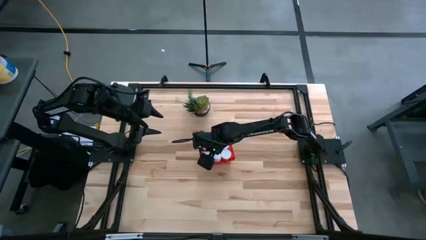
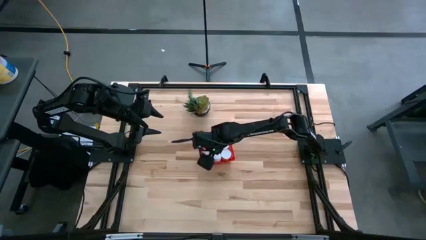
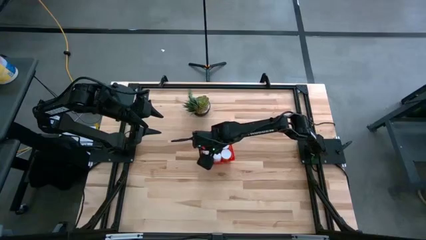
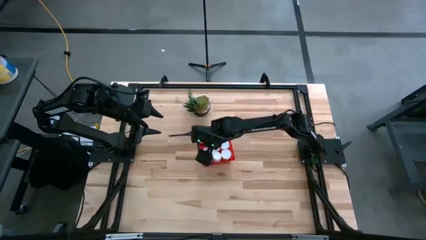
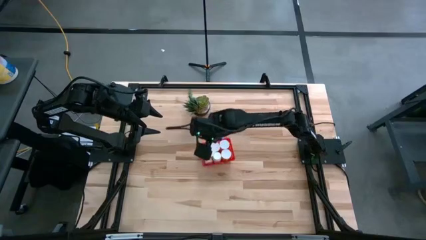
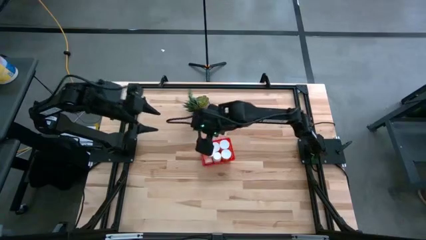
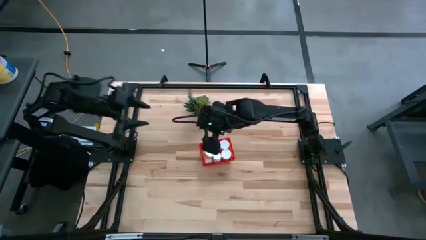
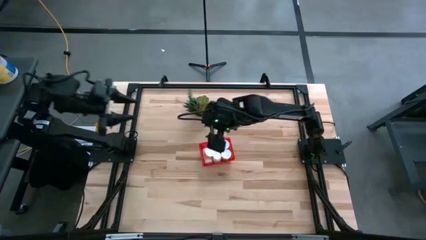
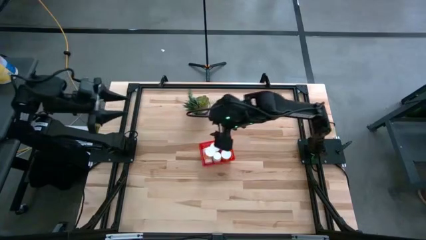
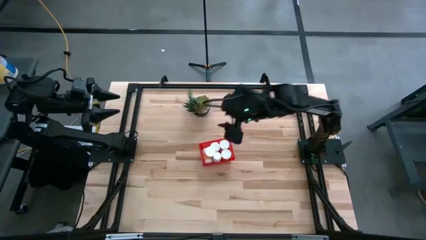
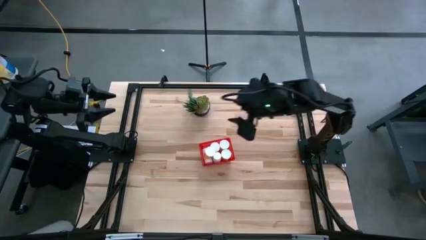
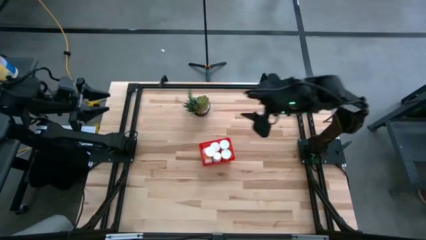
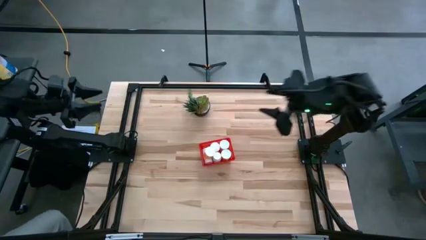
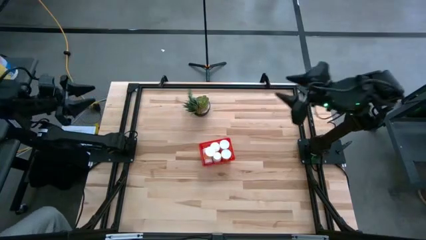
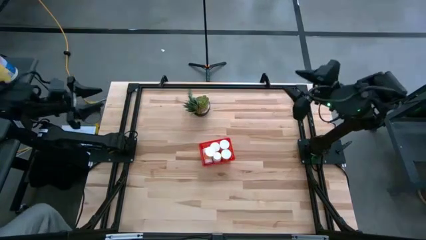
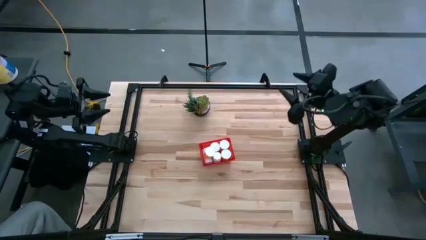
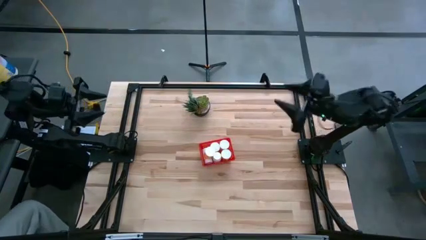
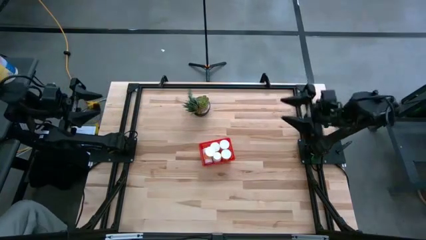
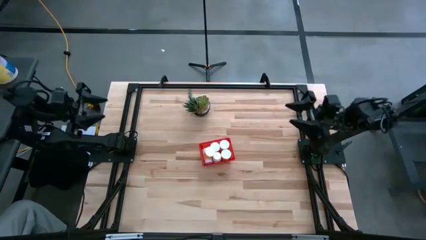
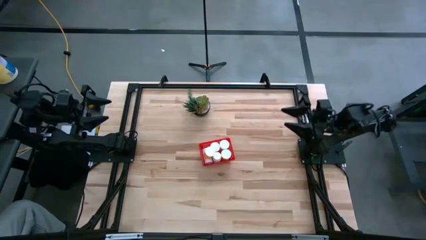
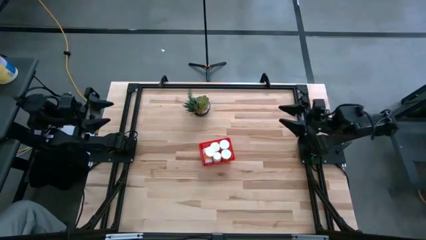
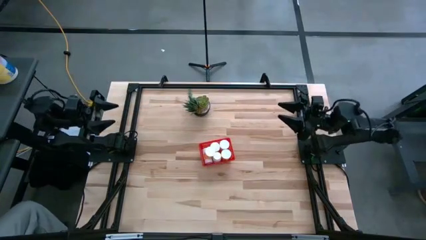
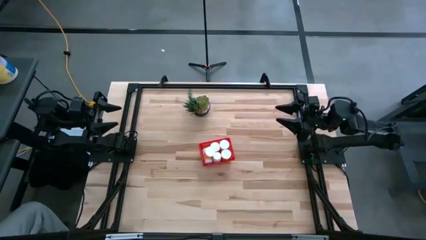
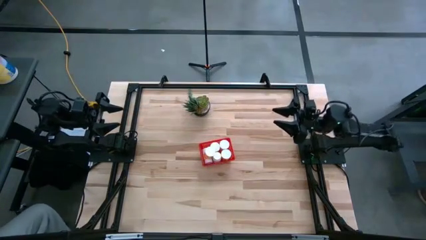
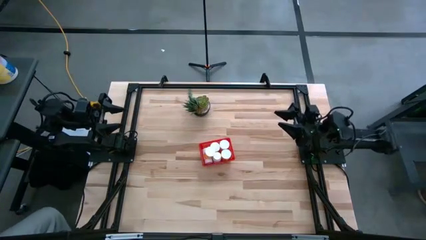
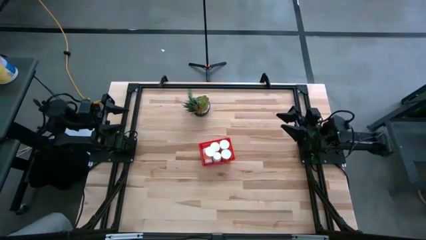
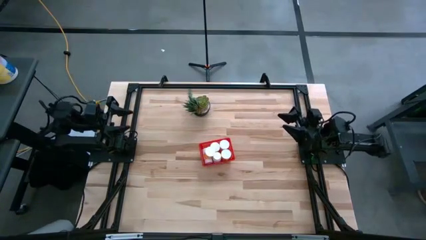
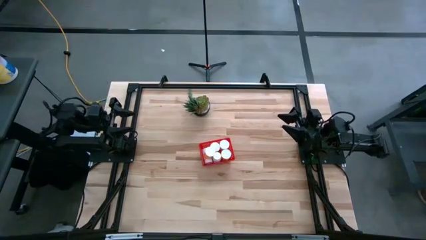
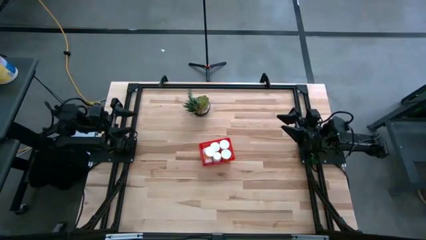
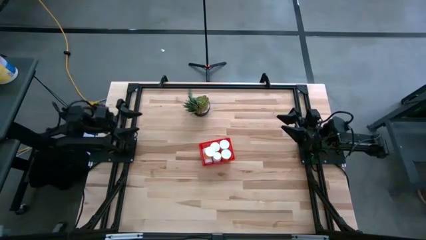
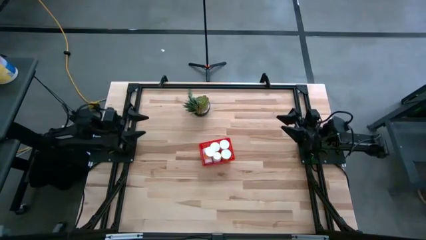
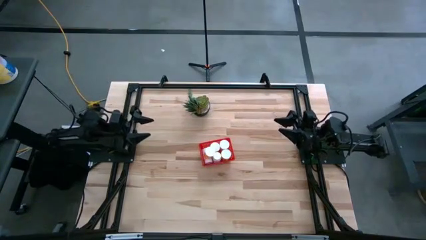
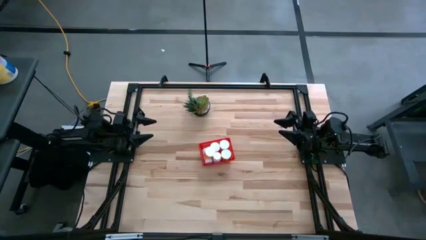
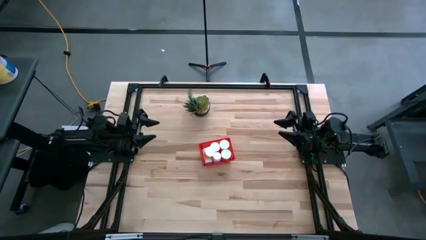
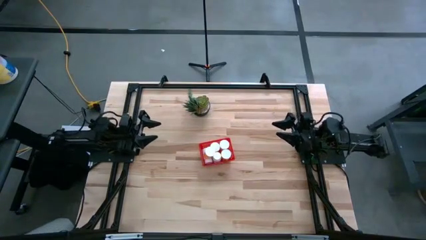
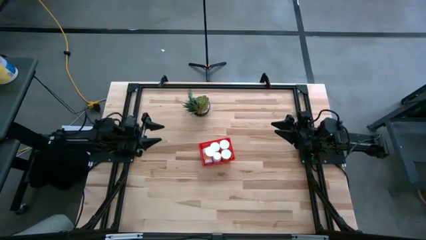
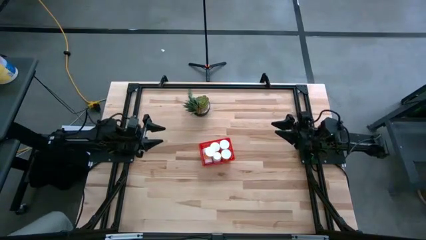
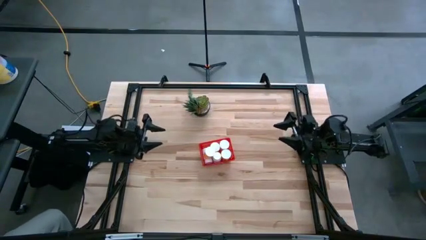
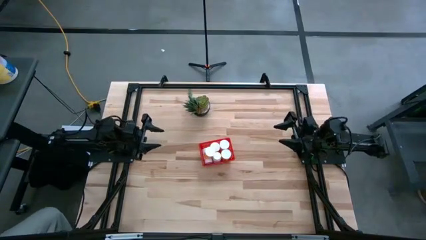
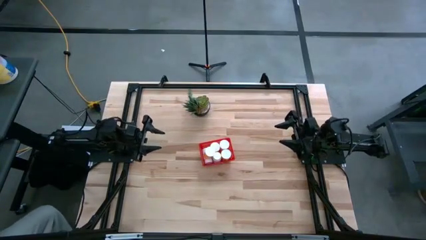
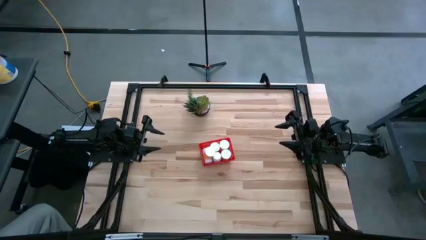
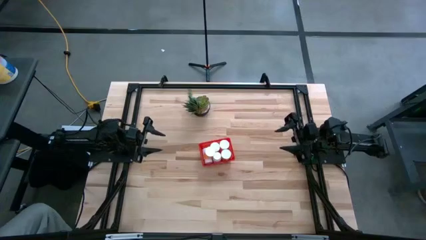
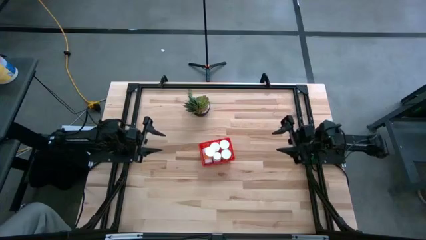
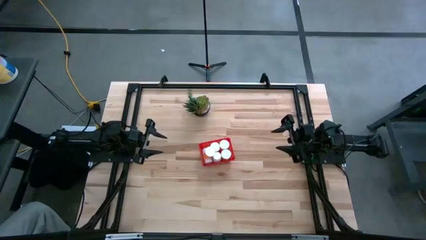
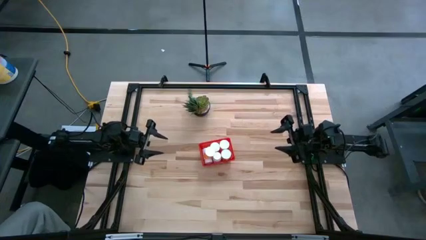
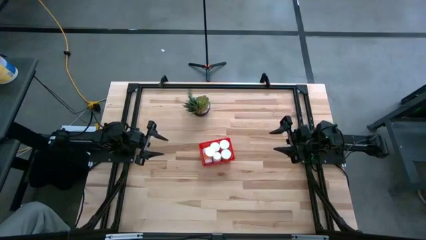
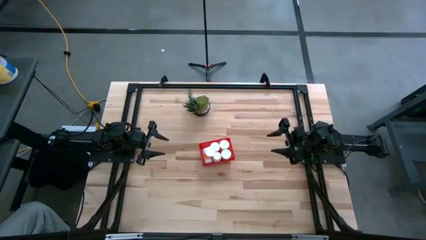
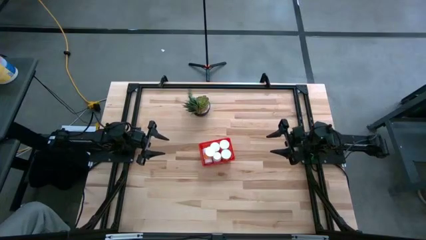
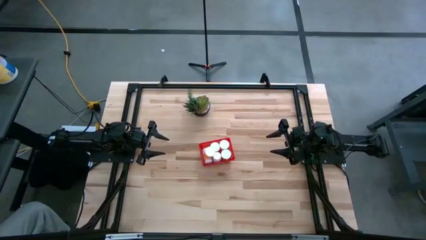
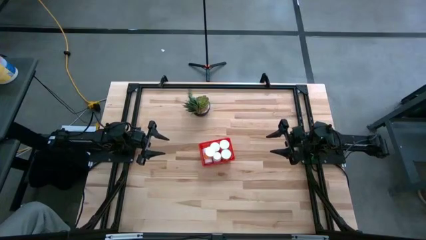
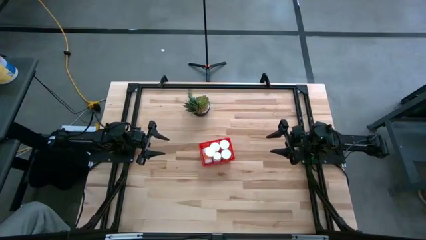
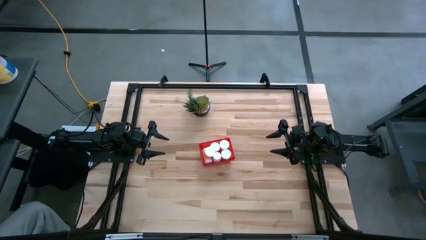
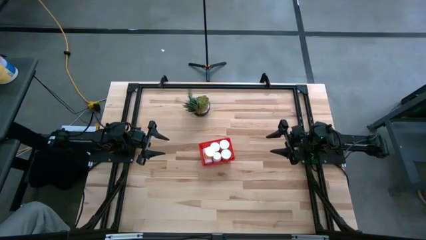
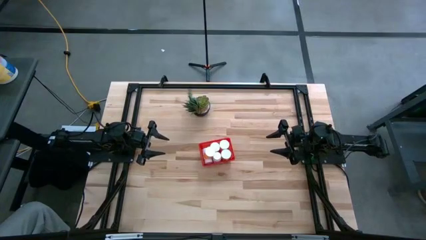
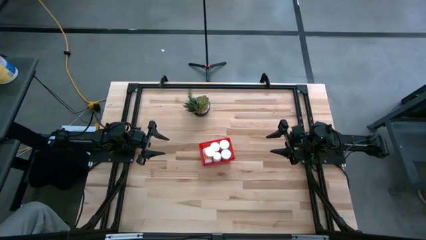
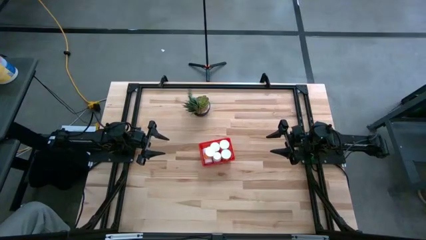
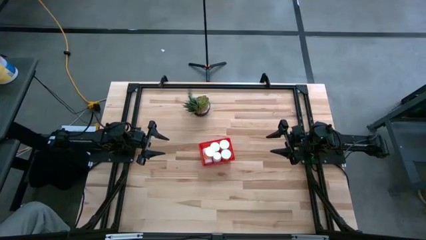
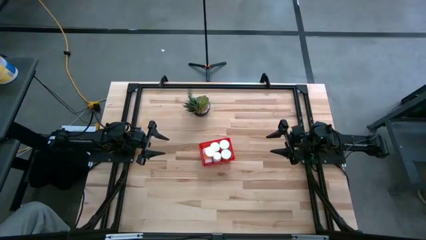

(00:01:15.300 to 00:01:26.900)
Task: Pick and place pill bottles into a basket
Return to Home Position

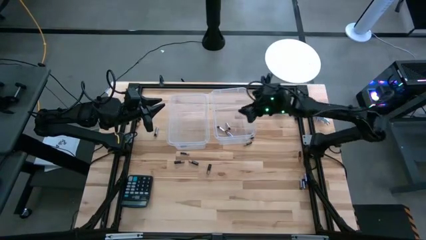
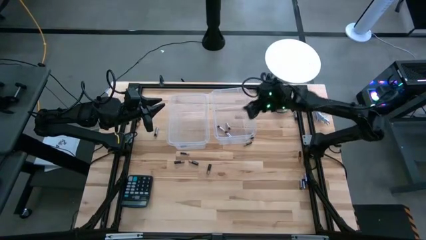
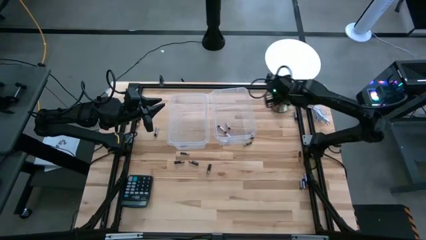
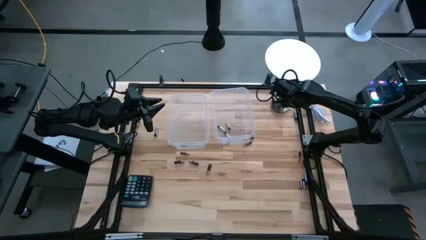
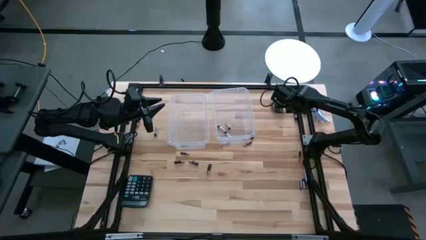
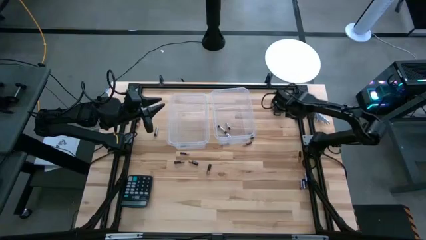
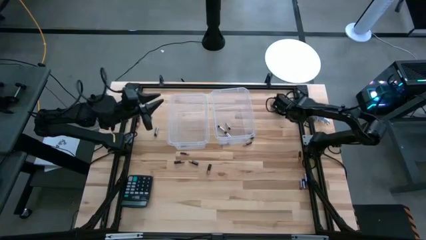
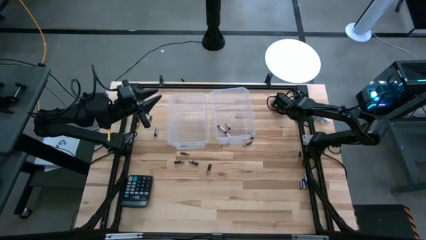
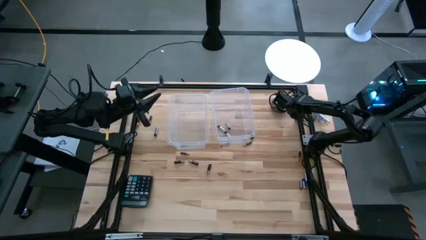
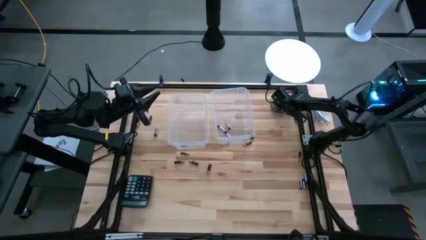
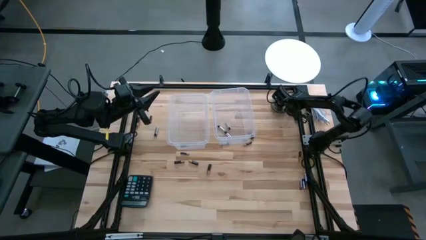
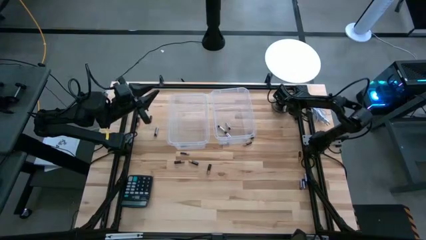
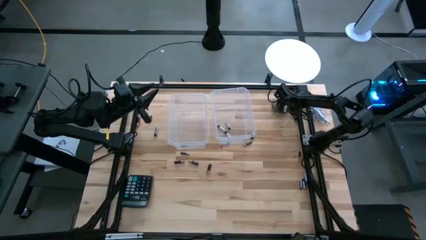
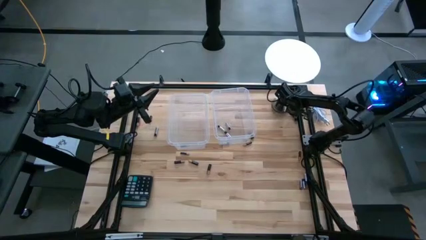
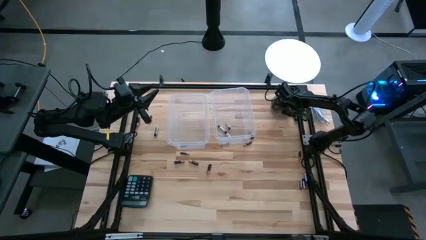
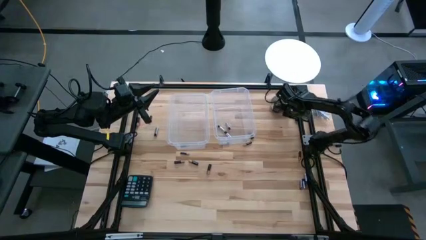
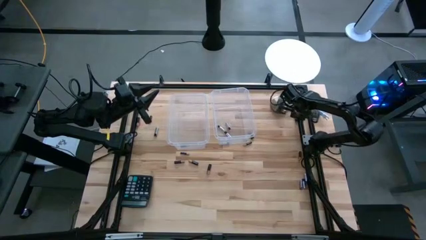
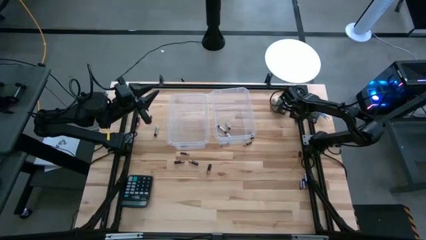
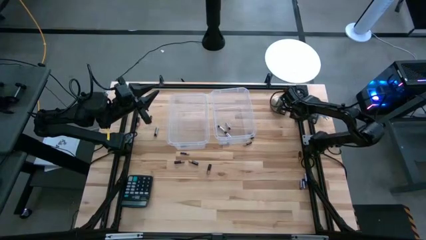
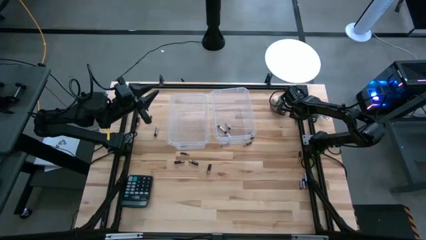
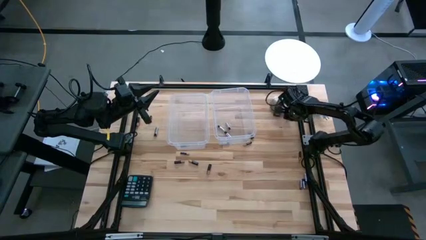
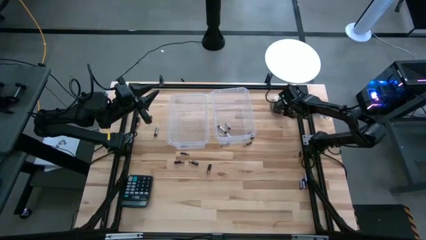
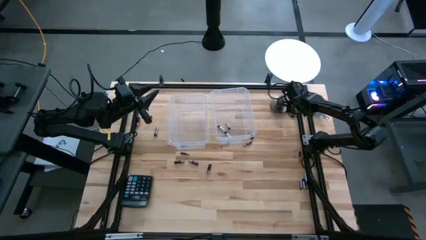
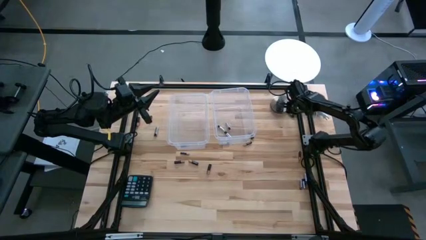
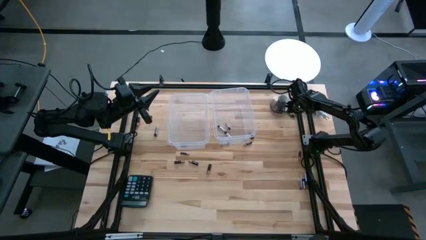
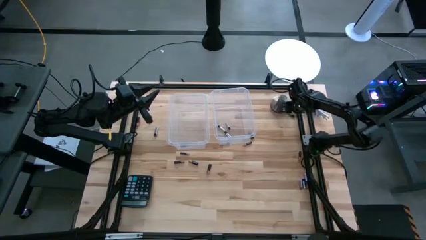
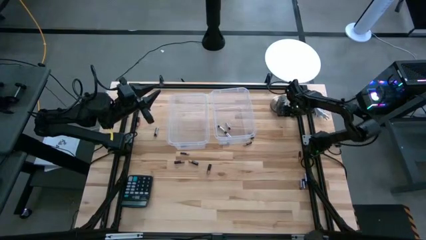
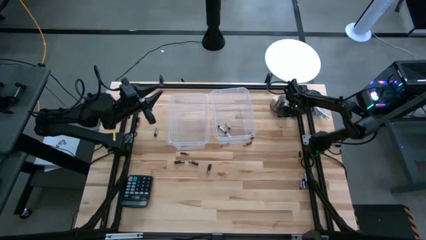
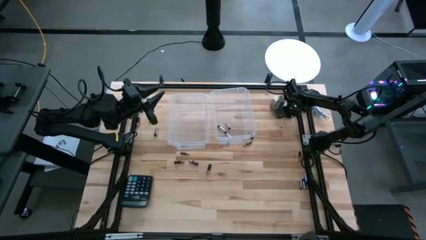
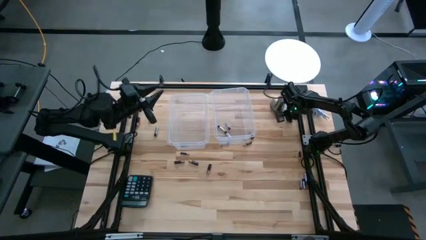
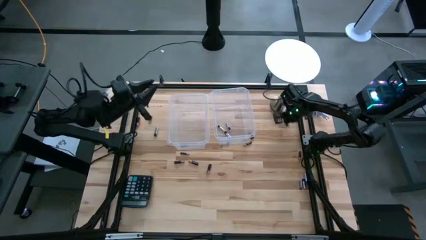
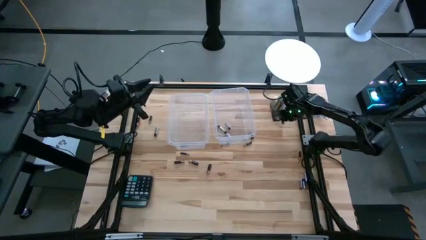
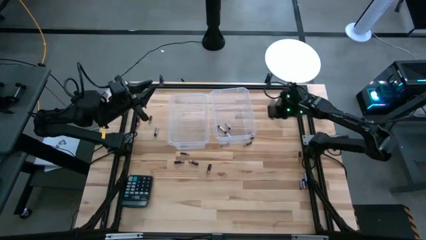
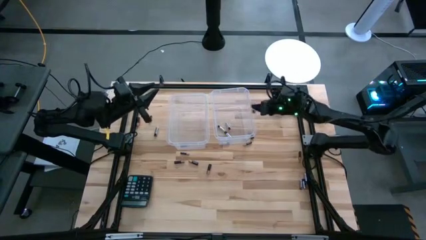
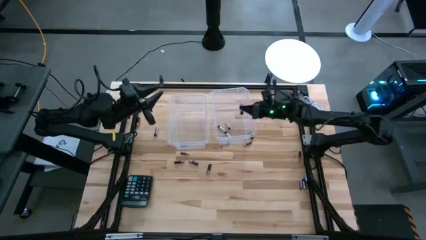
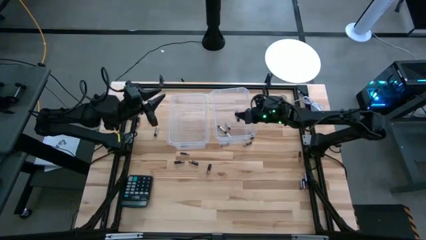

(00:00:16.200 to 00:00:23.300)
Task: Sort batteries
Put silver battery into the right transparent bin
